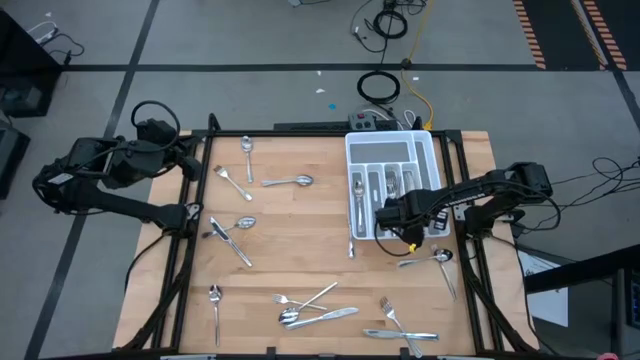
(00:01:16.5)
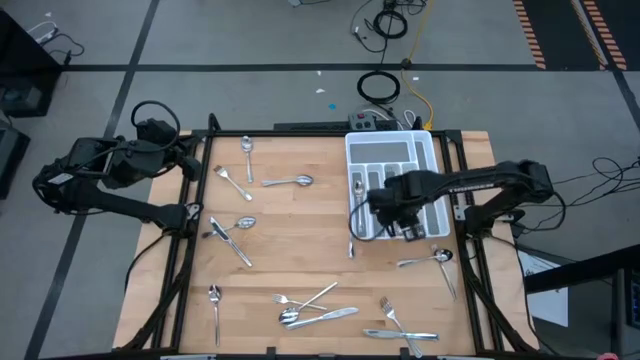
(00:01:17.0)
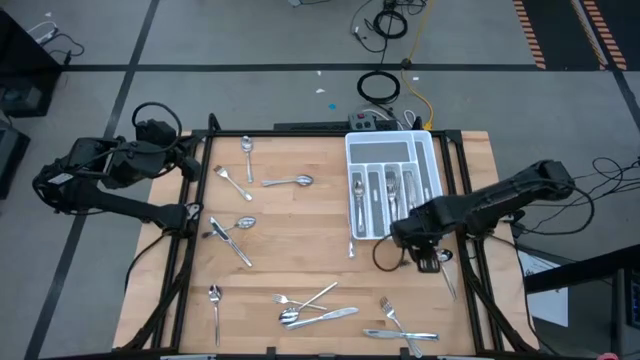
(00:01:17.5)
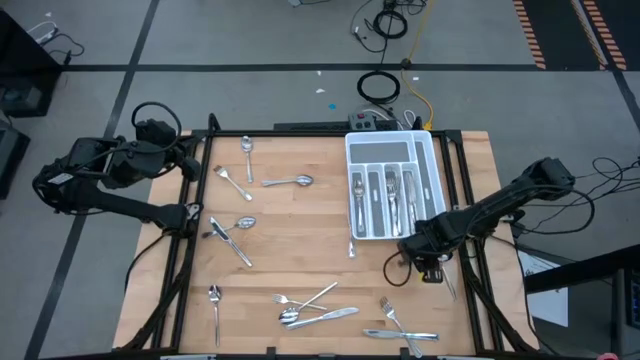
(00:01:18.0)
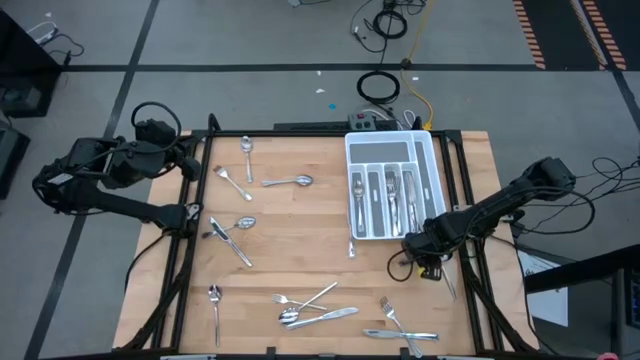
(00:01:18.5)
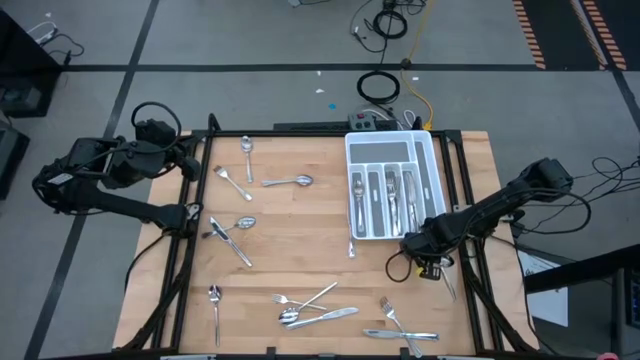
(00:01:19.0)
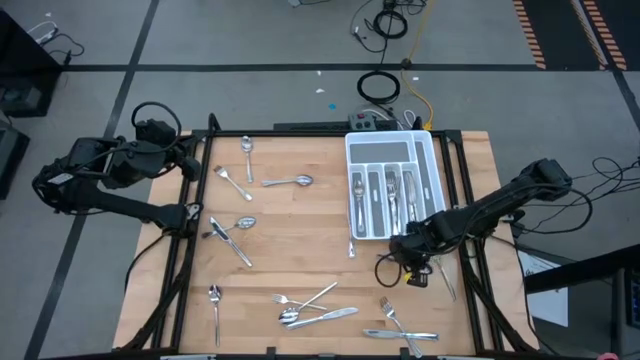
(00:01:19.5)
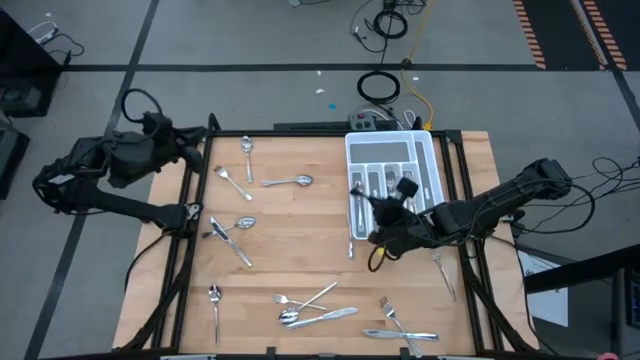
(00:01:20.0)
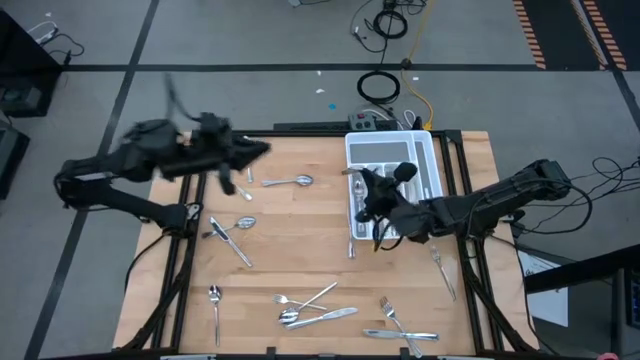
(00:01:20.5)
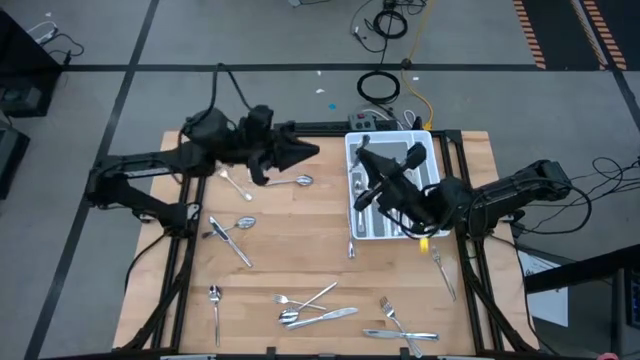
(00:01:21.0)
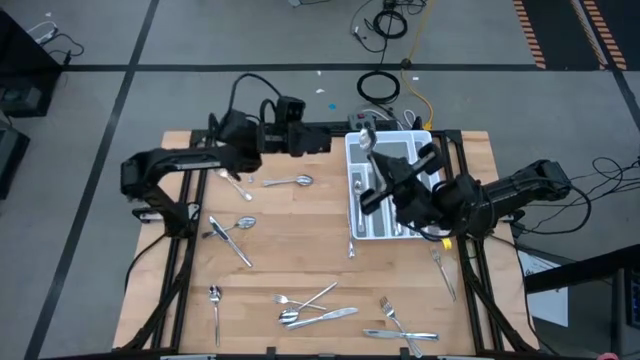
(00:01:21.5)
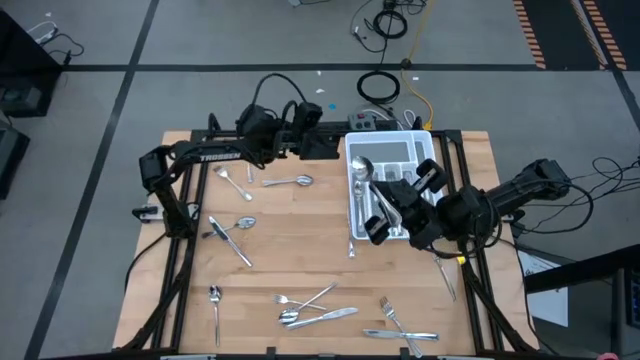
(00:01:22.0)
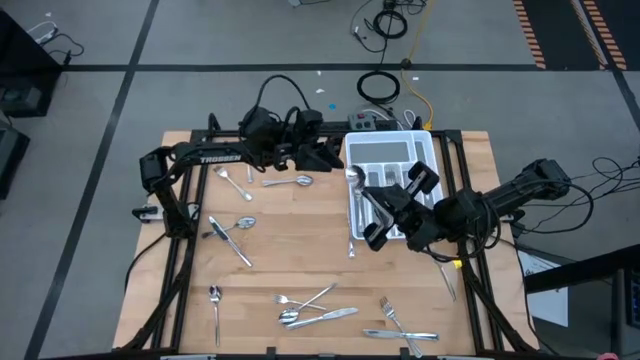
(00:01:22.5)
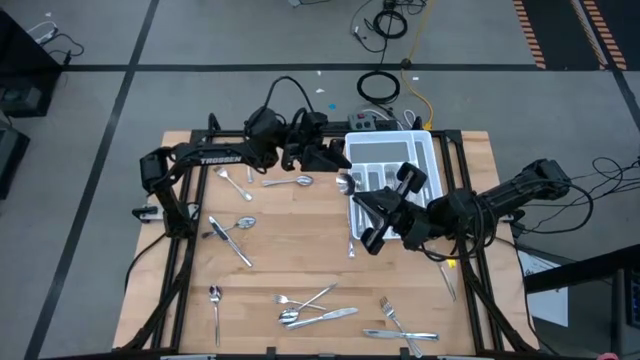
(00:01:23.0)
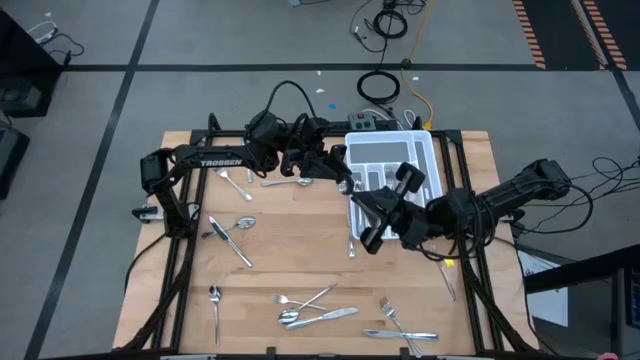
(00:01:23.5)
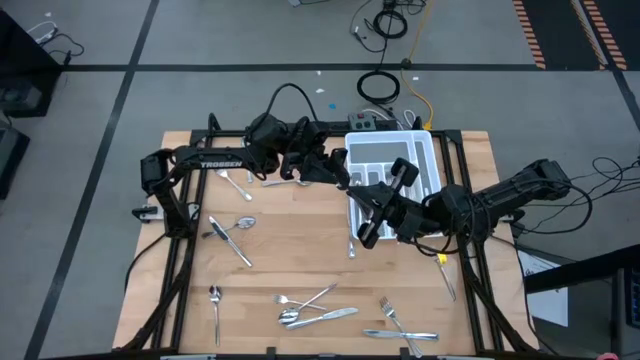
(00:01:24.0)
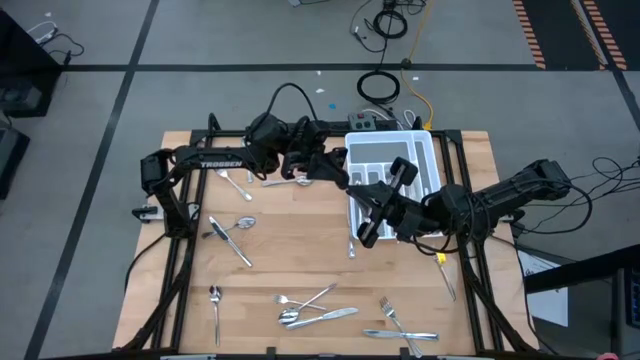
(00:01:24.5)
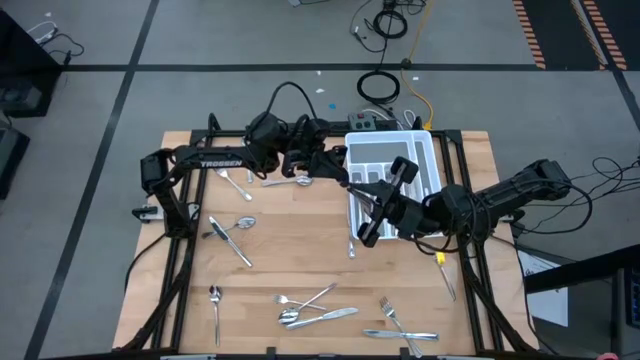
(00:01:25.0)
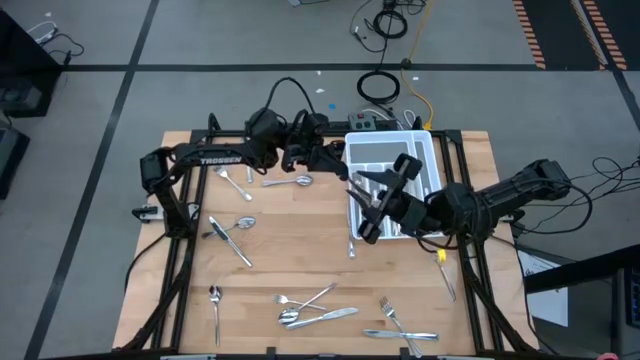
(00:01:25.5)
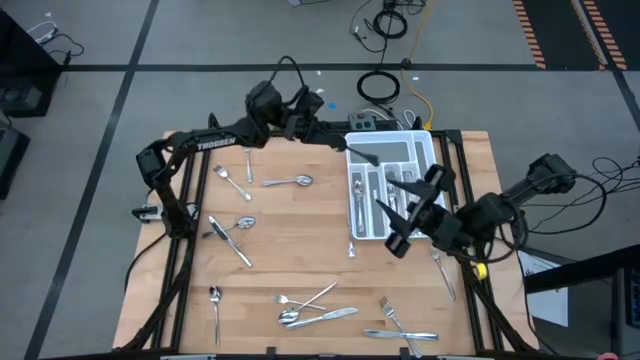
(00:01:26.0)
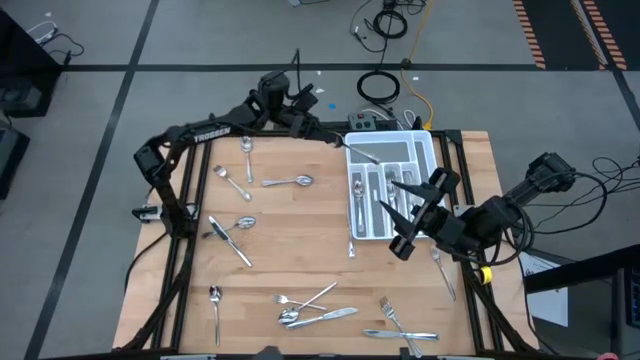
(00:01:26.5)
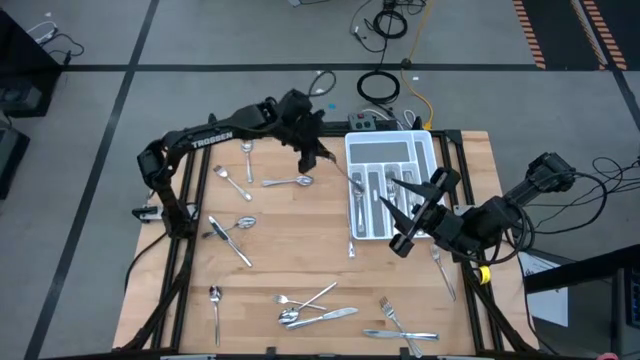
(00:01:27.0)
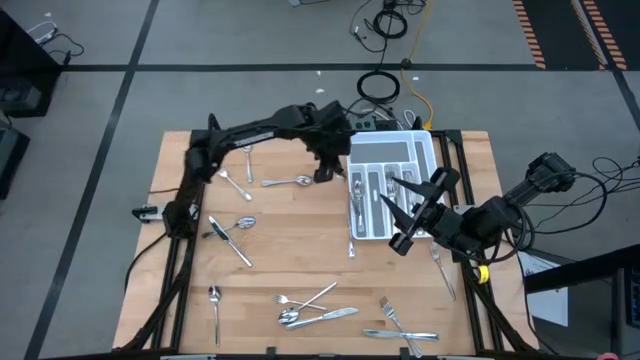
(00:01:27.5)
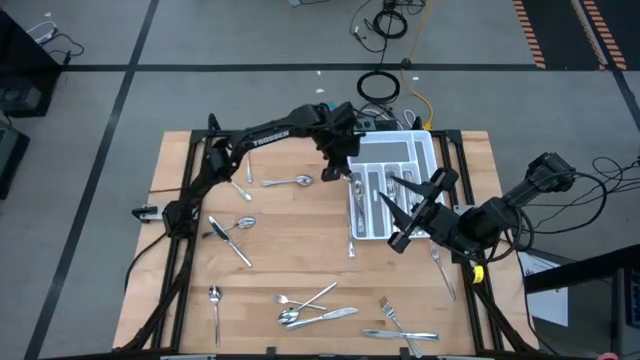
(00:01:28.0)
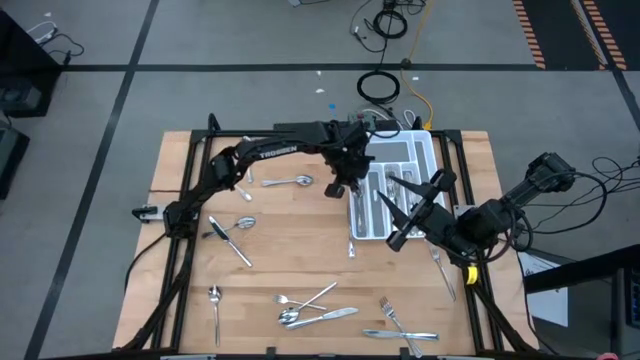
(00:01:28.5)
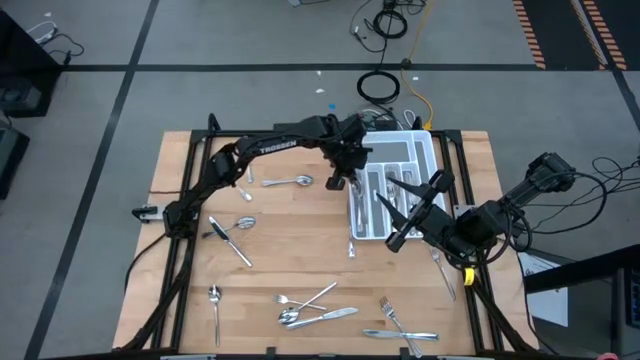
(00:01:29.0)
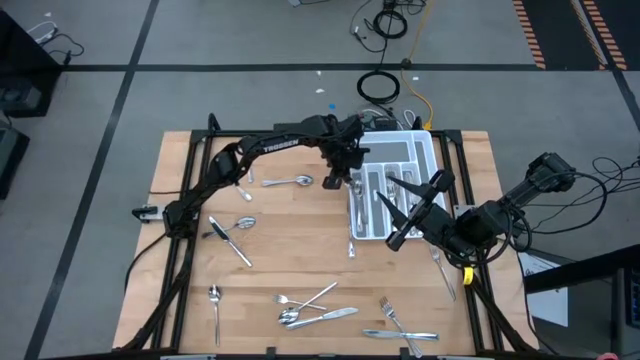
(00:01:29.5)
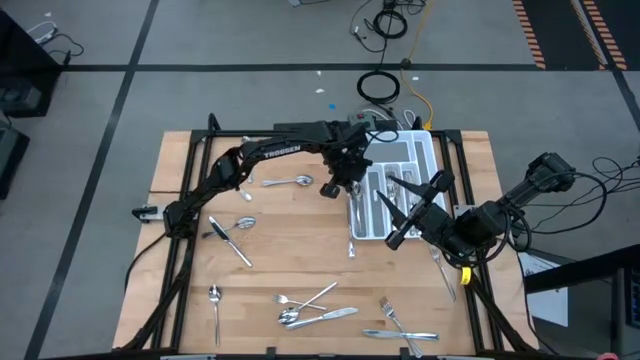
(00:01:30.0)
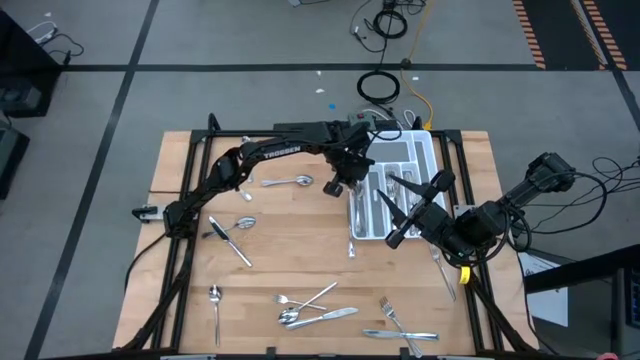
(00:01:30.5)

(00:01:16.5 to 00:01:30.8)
Task: Sort silverware
Put the silver spoon into the white silverware tray

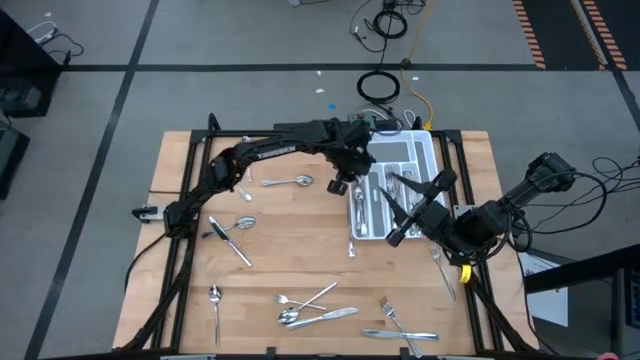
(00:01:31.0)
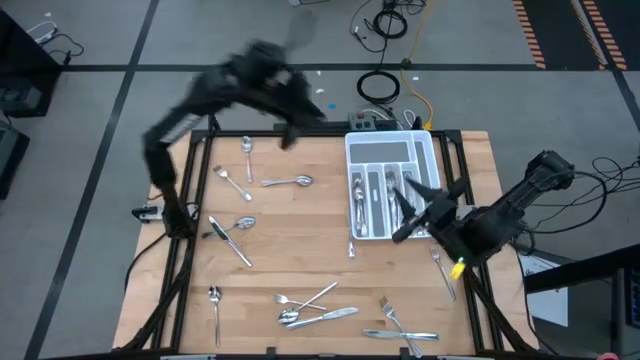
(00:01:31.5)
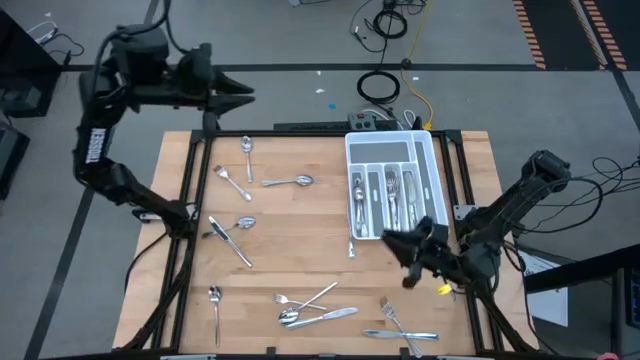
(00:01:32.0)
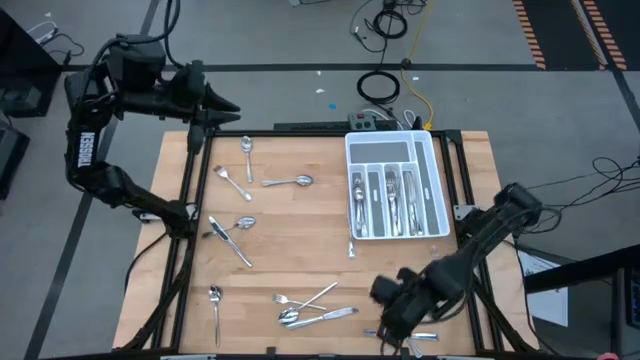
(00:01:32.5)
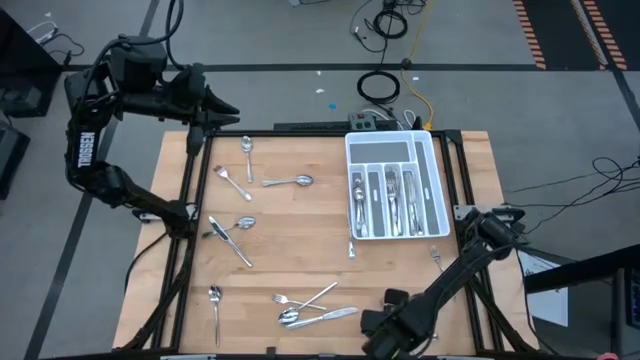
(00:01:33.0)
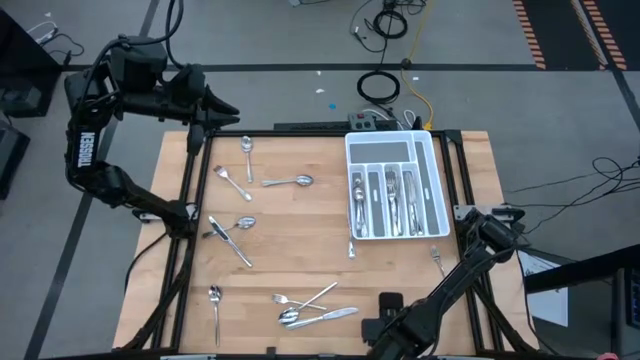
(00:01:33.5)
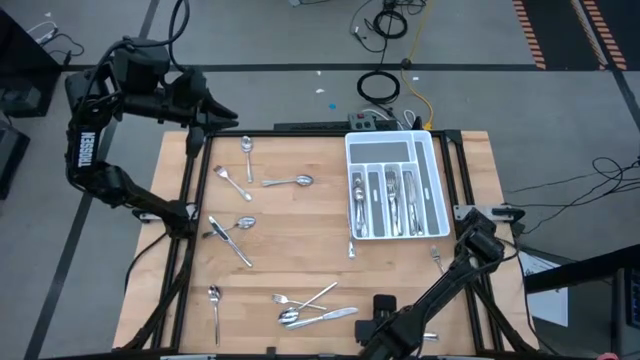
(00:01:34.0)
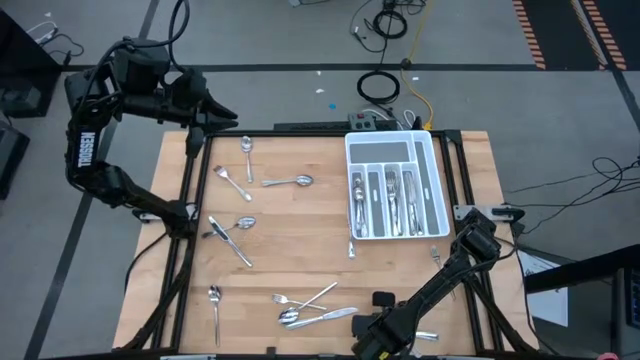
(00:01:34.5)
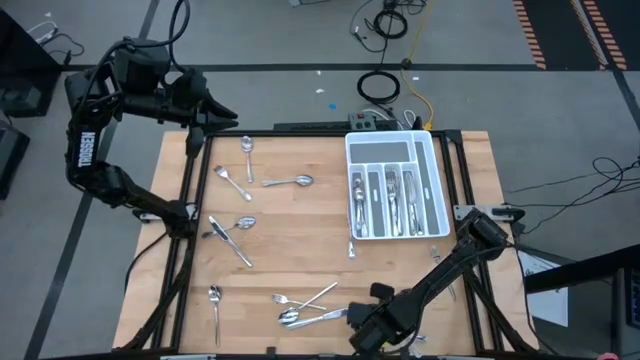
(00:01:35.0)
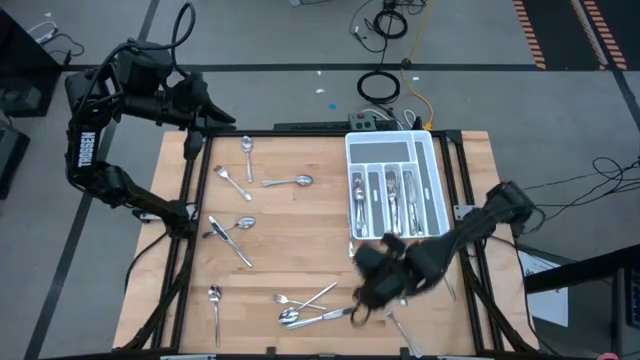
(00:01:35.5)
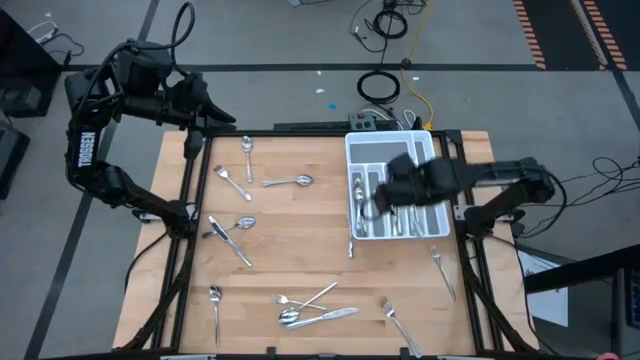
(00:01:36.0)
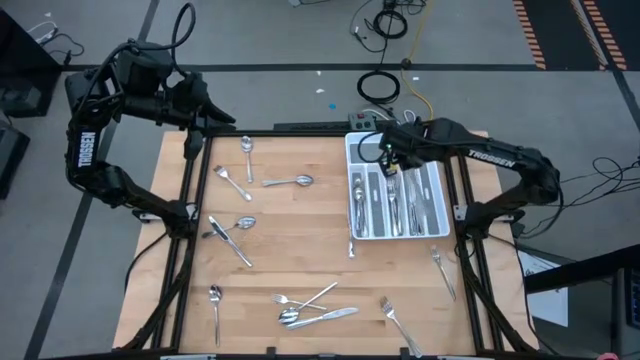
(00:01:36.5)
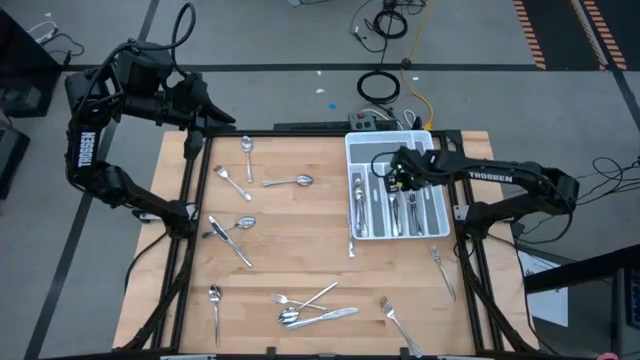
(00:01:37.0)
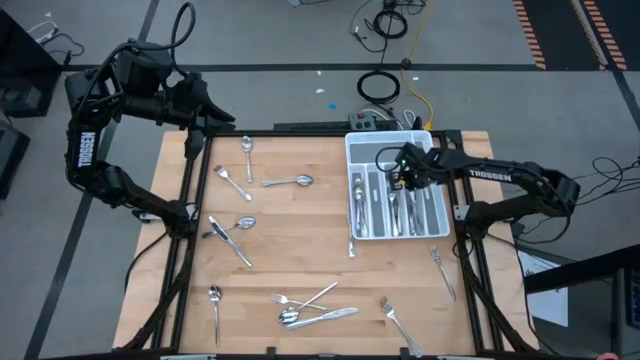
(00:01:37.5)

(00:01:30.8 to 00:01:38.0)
Put the silver knife into the white silverware tray
